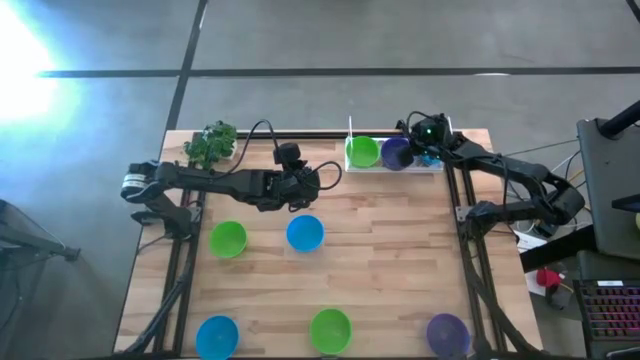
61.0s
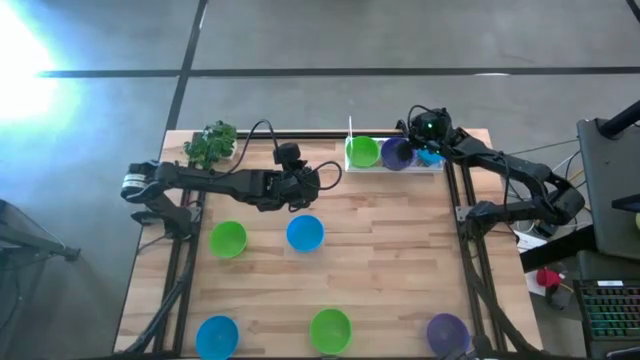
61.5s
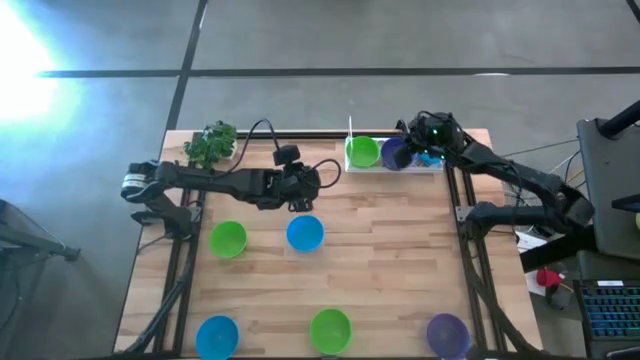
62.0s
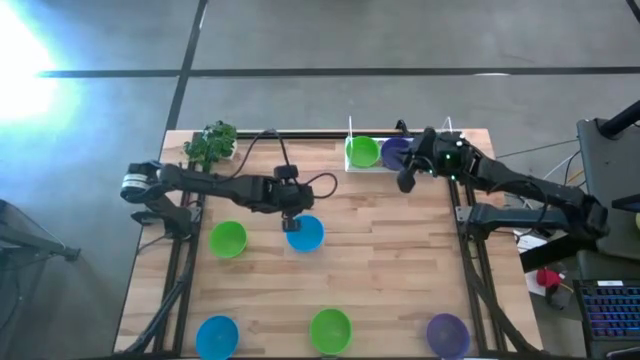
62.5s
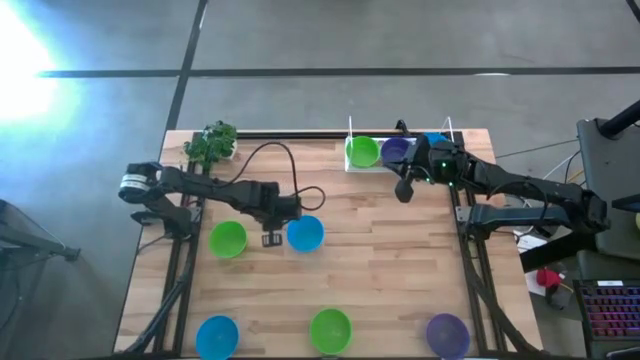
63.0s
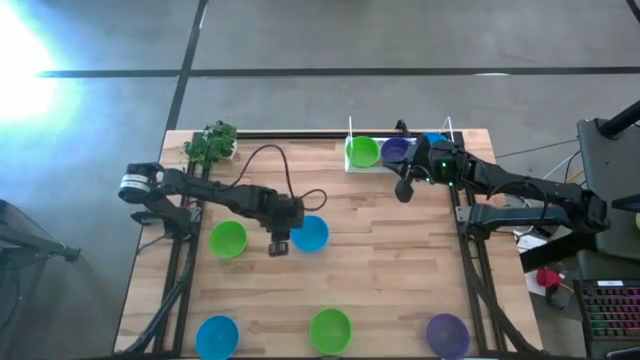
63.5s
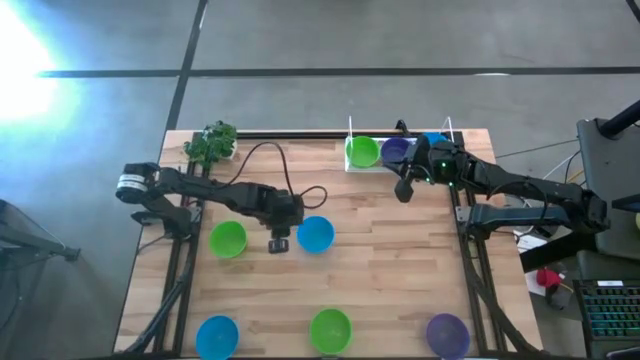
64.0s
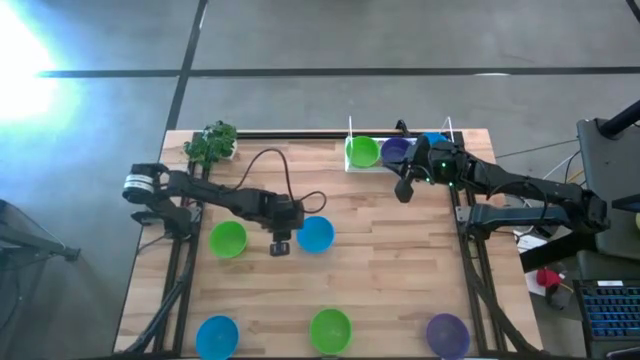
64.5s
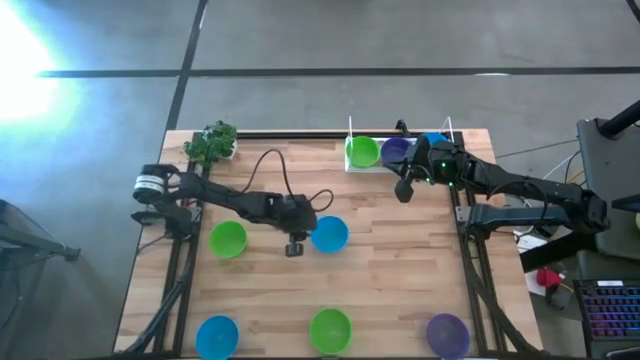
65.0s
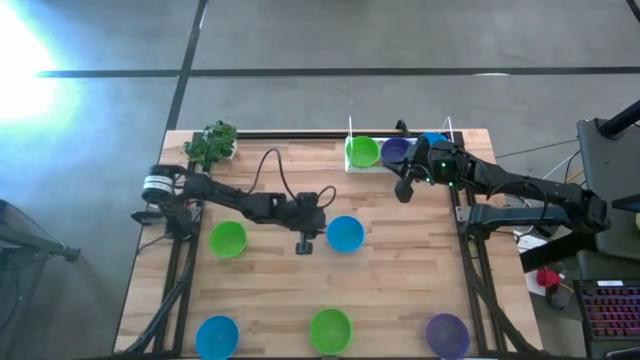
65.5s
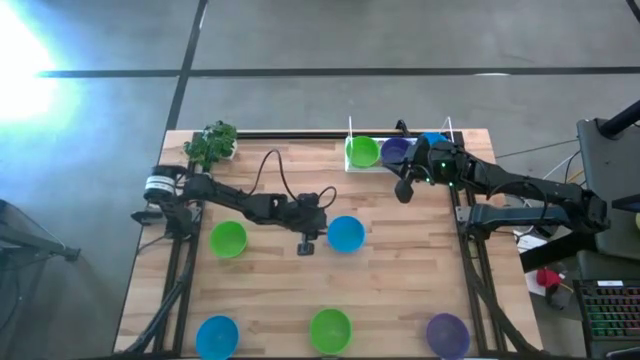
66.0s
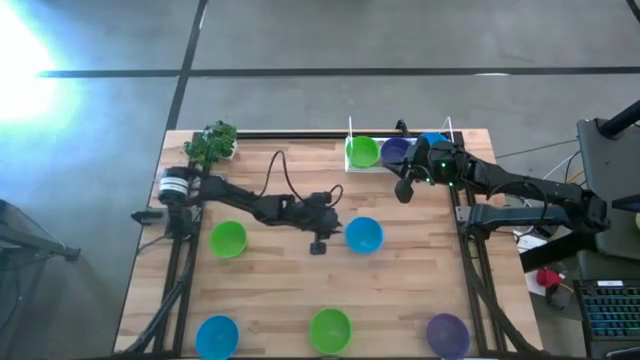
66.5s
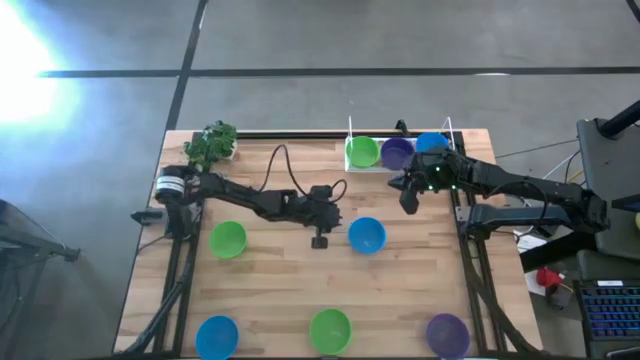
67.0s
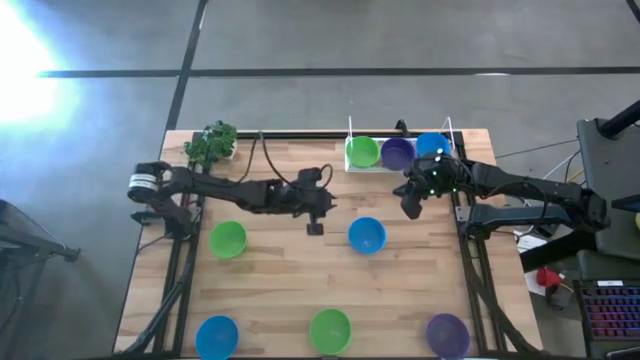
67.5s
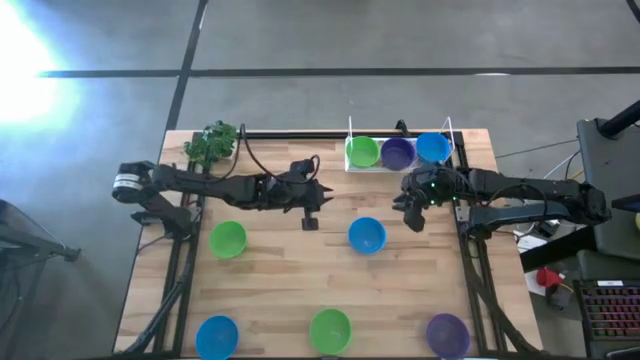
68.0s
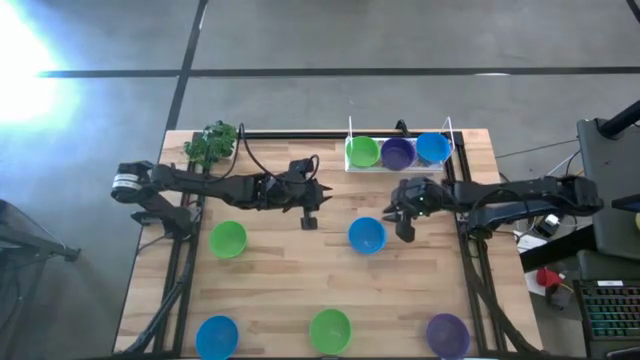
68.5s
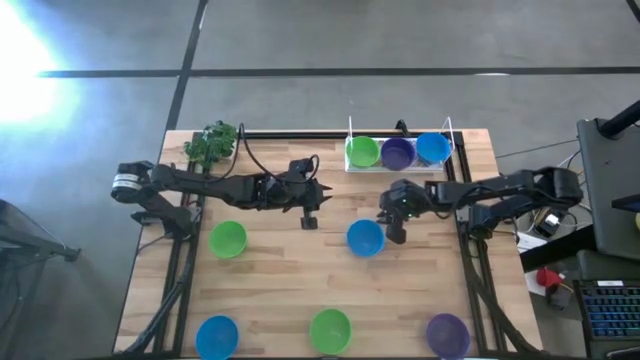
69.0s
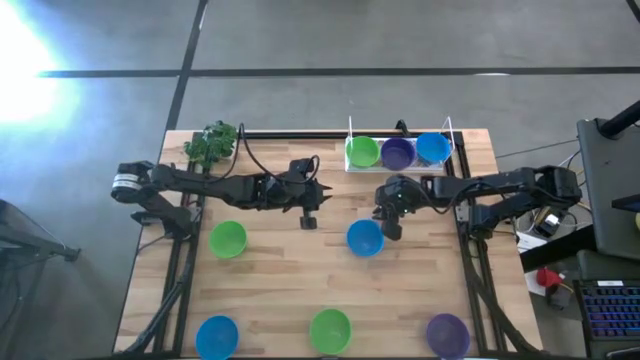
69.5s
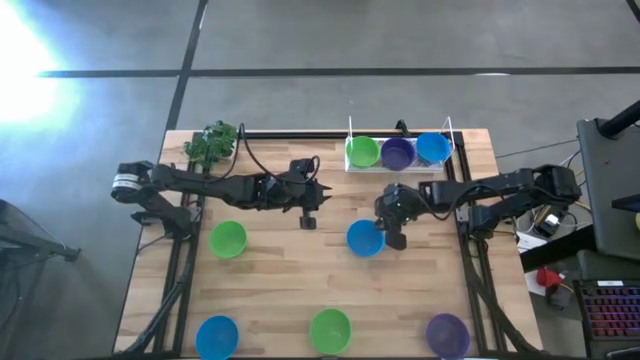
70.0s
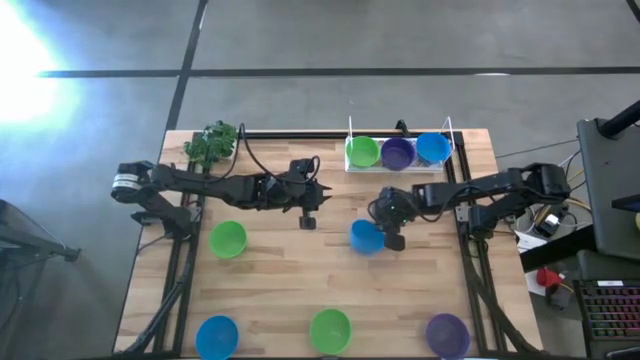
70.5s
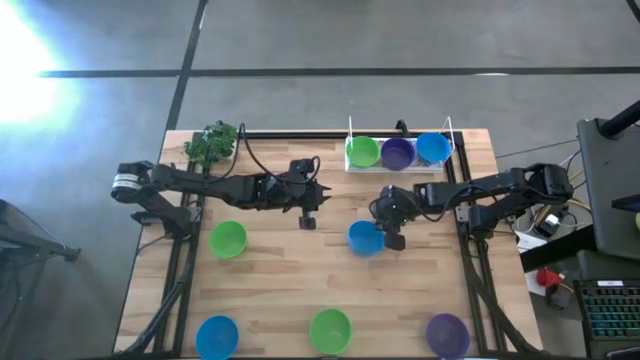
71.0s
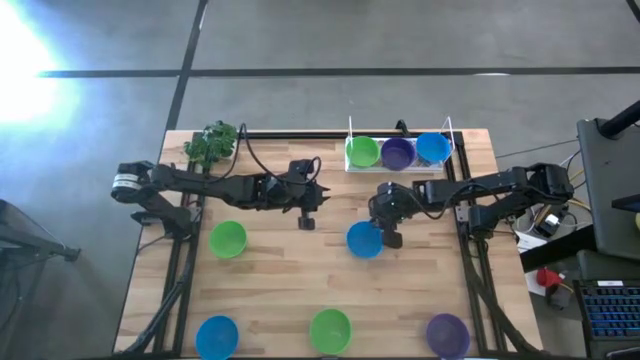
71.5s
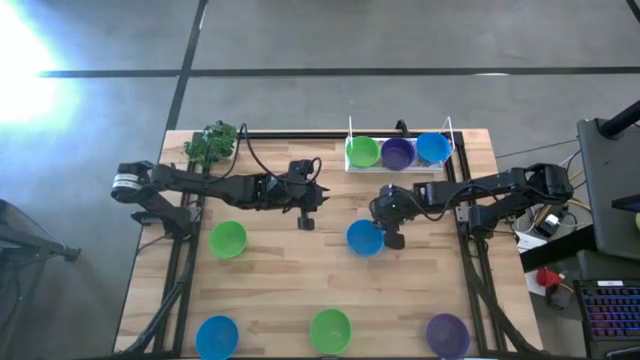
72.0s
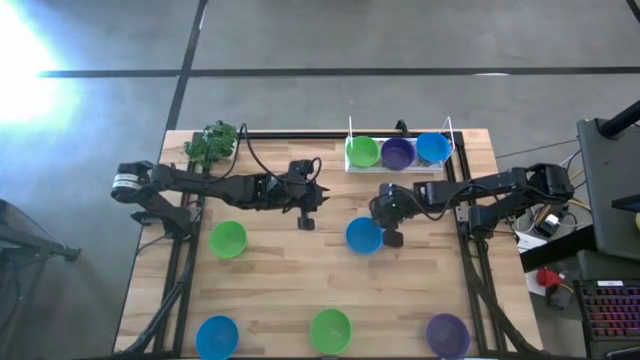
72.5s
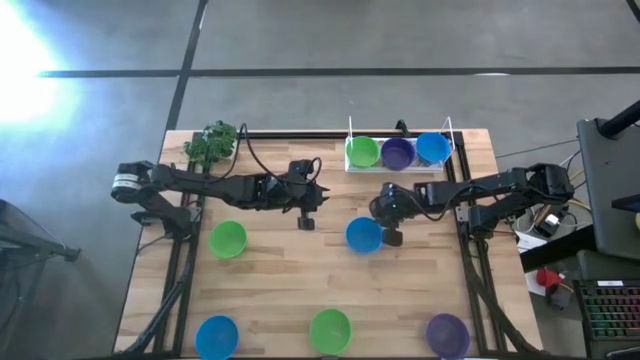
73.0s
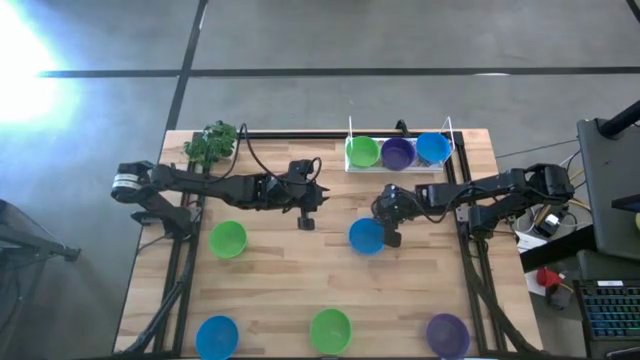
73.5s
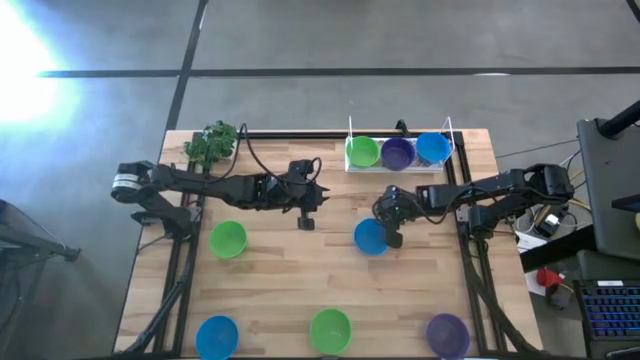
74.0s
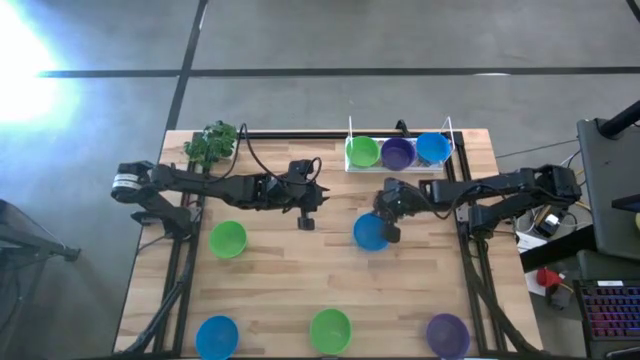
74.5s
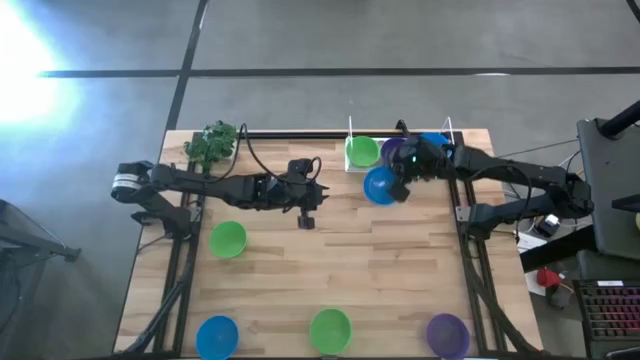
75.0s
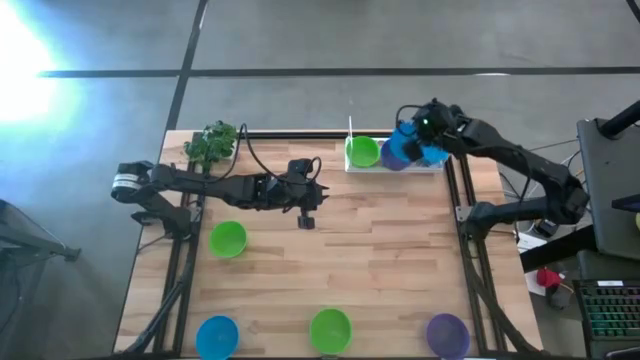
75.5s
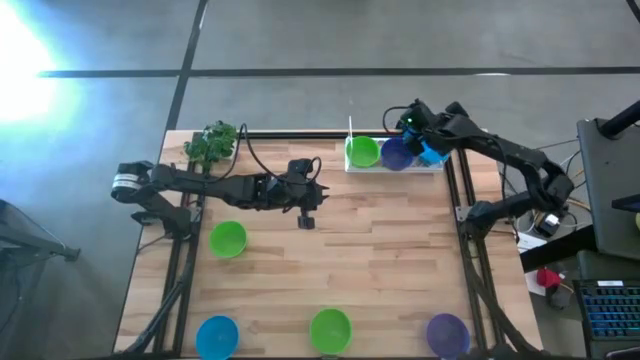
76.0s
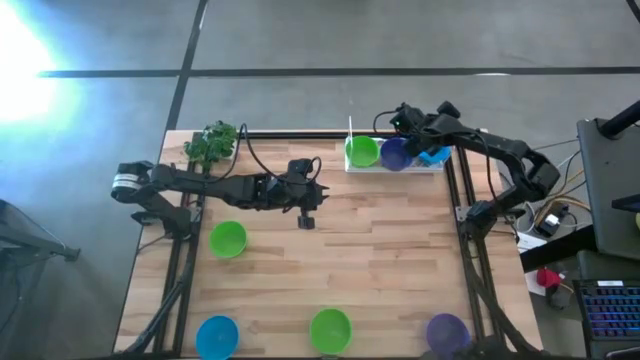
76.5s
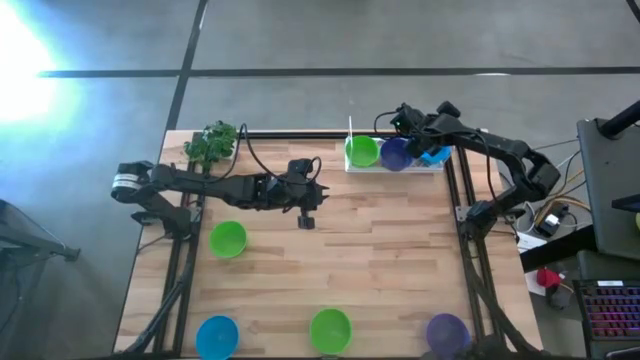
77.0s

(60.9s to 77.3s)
Task: Pick & Place Mini bowls
Stack the top blue bowl on top of the blue bowl on the shelf
